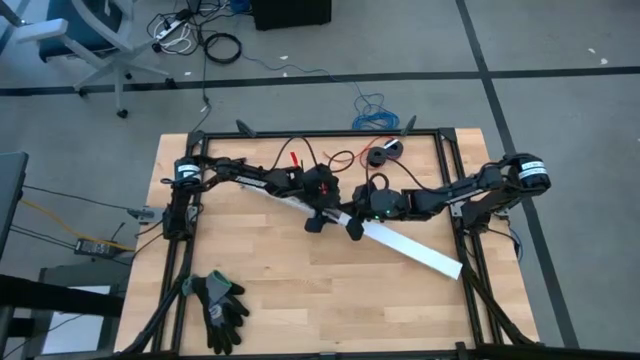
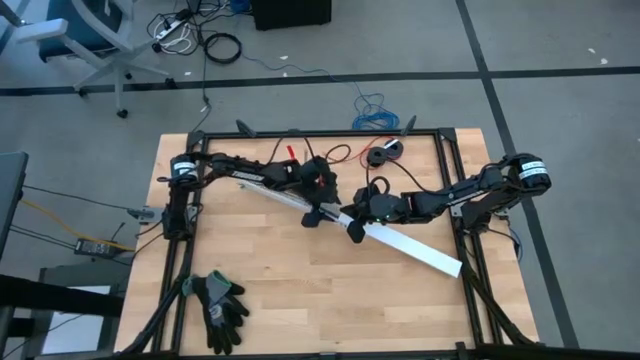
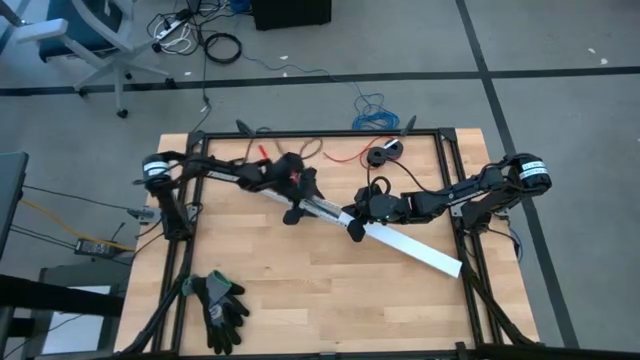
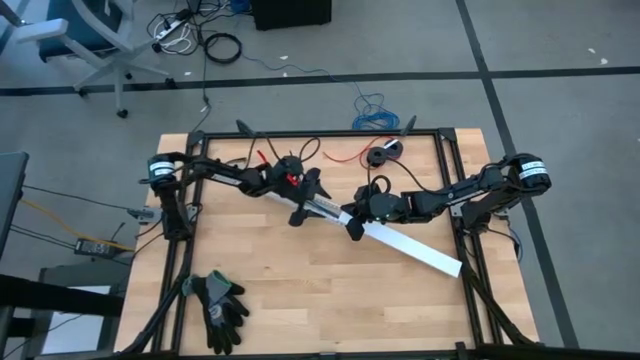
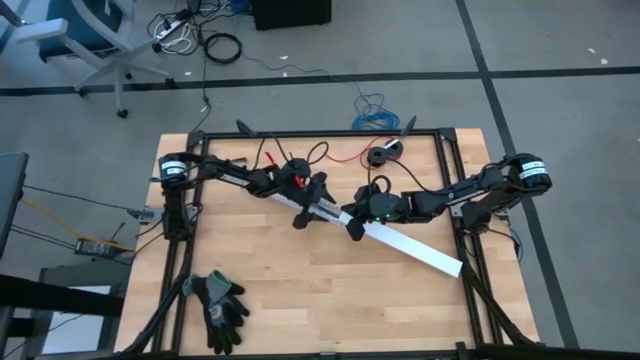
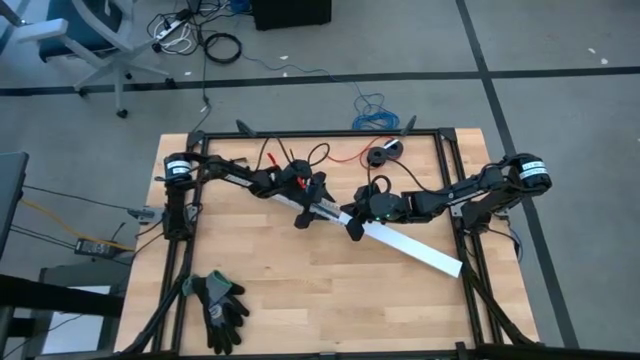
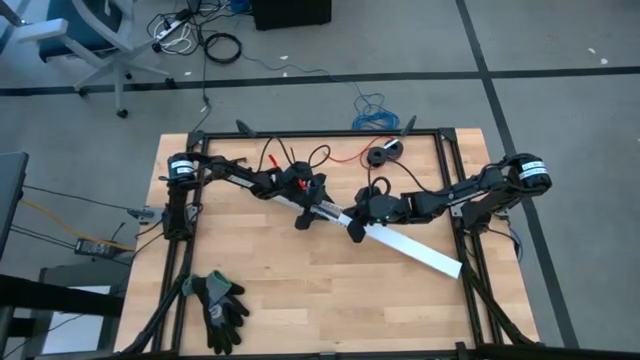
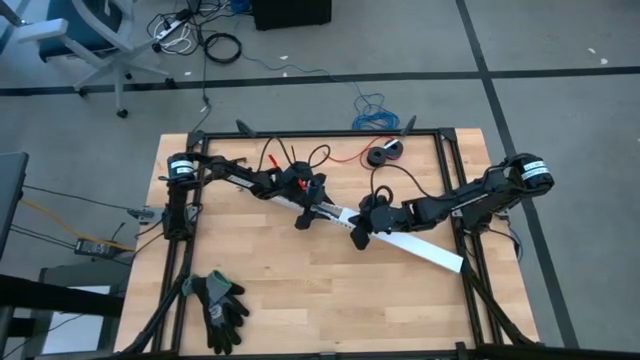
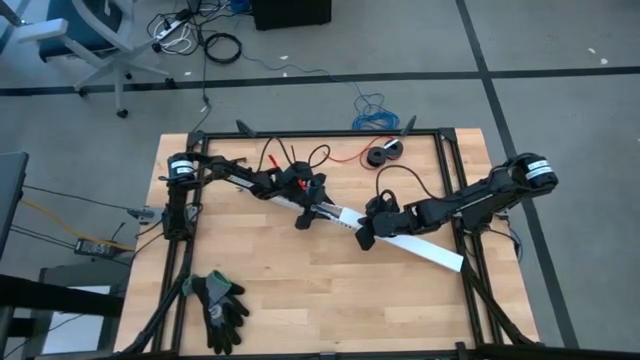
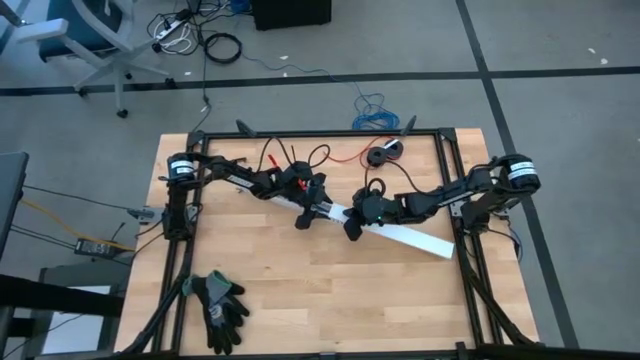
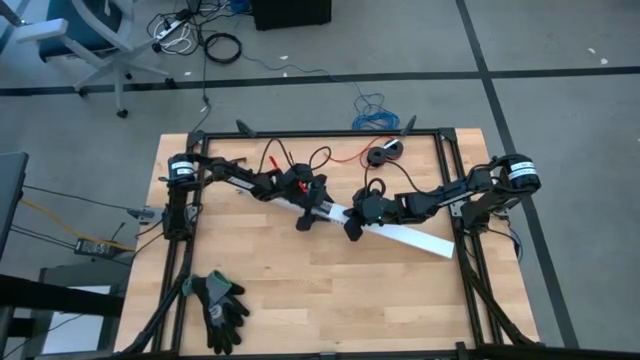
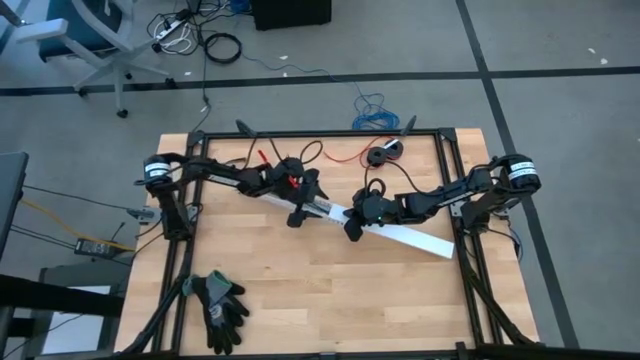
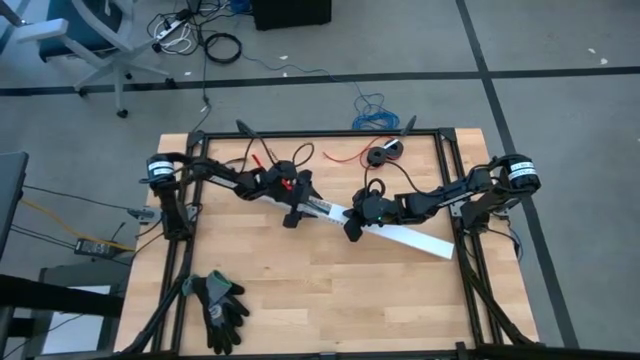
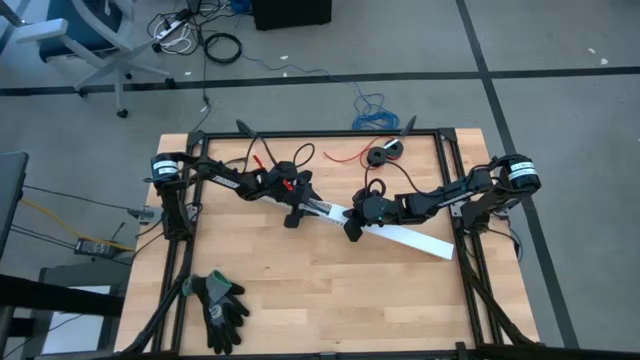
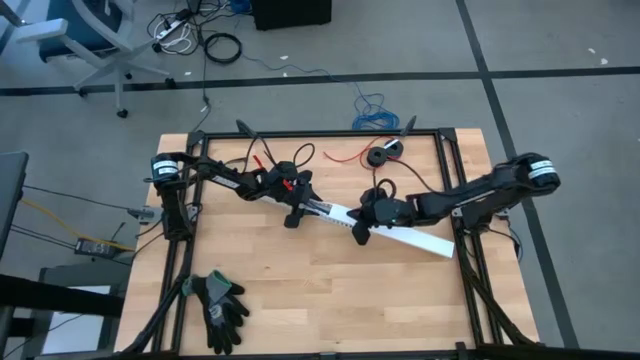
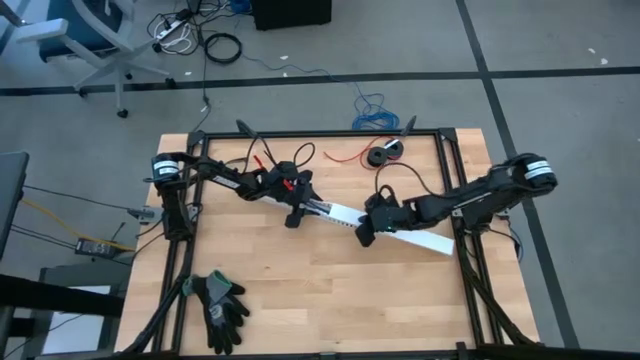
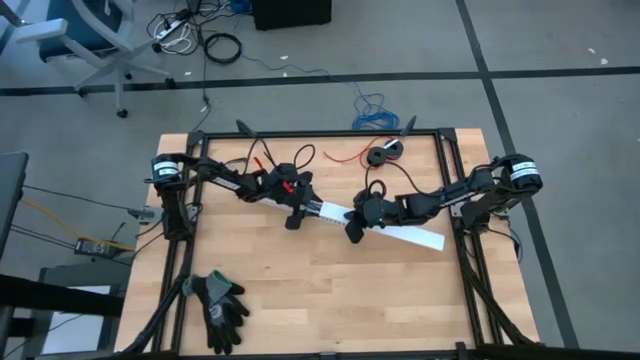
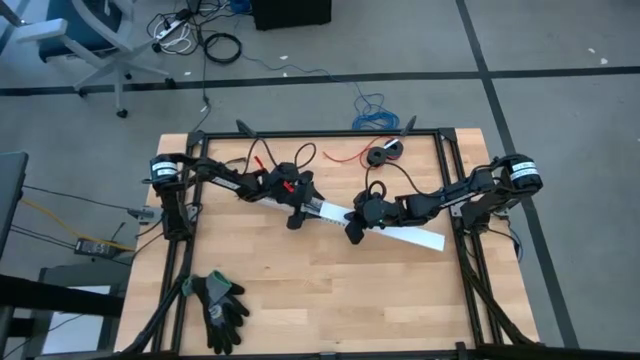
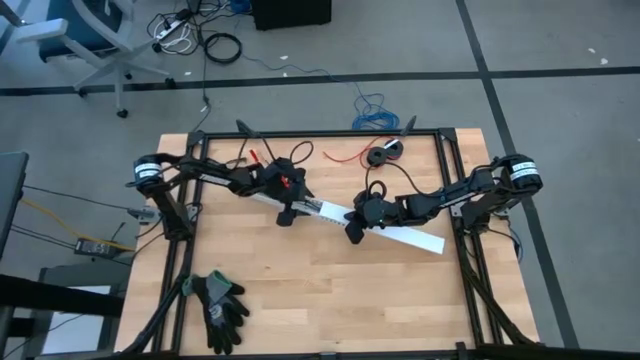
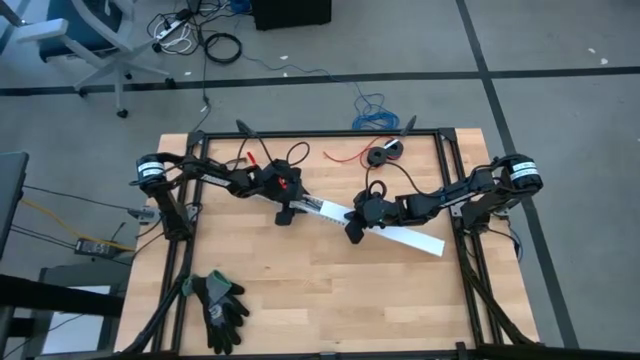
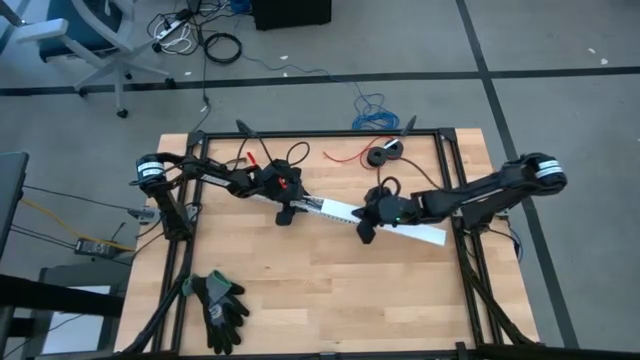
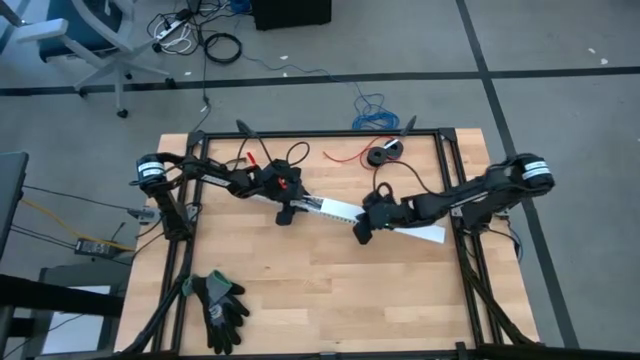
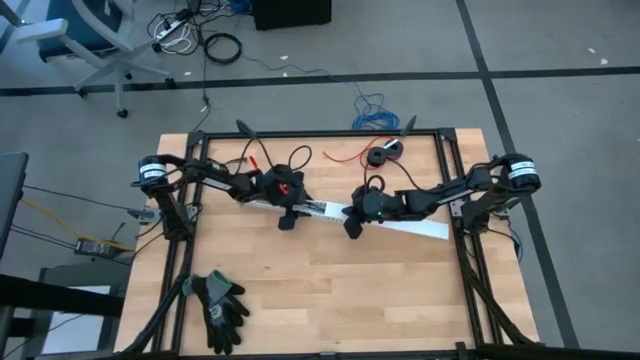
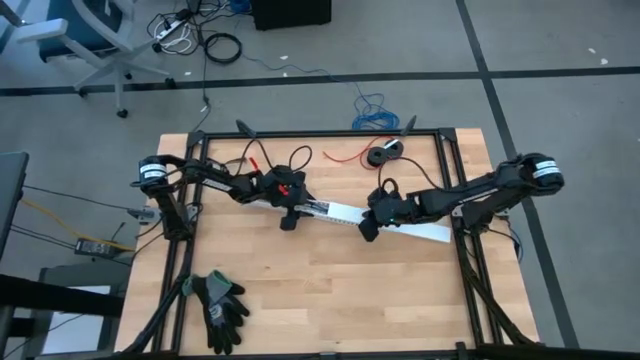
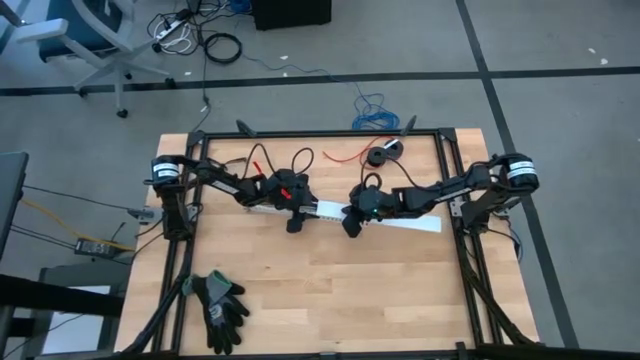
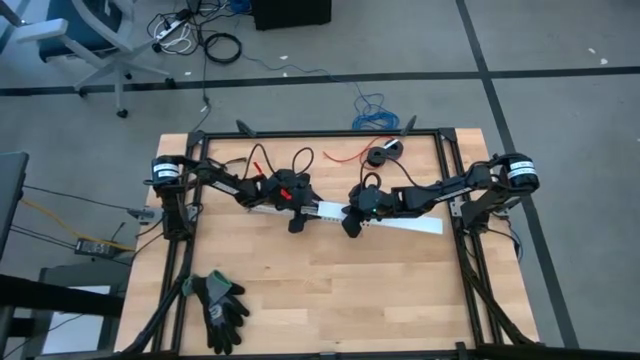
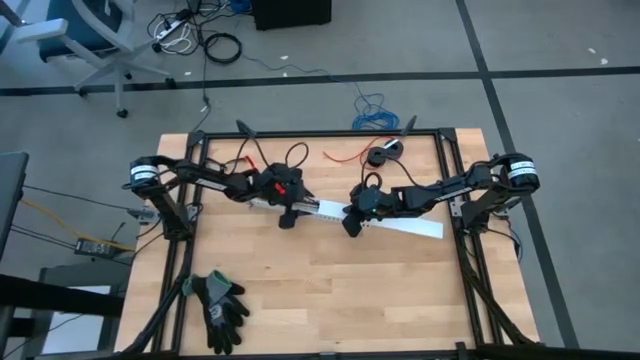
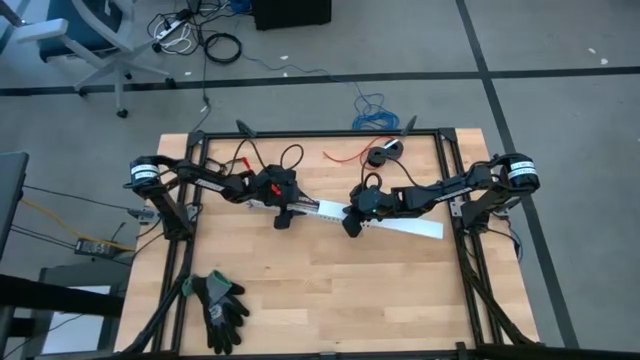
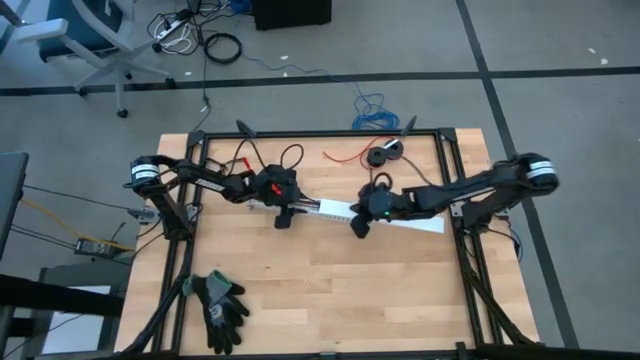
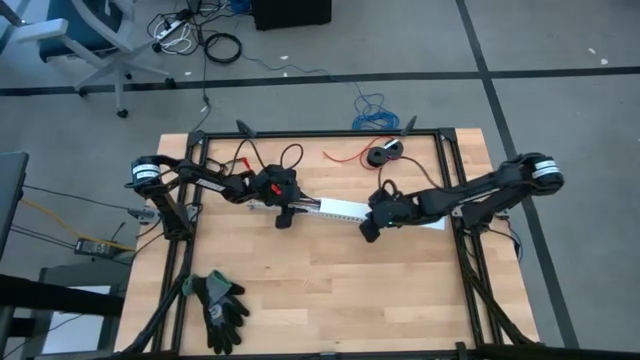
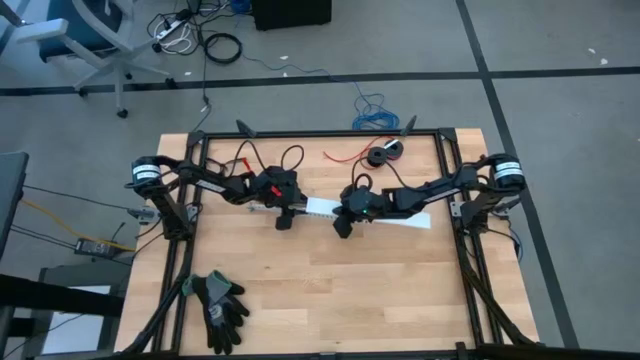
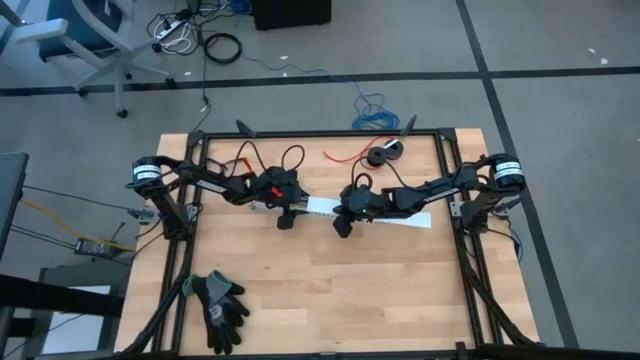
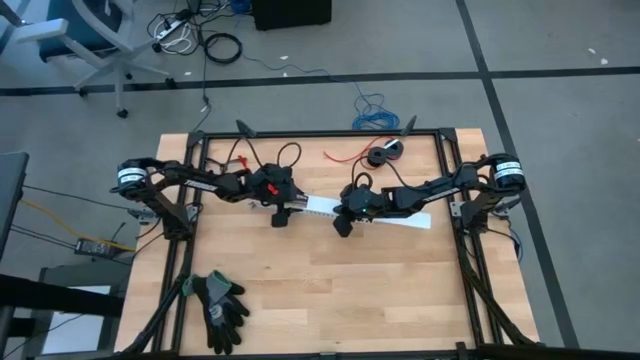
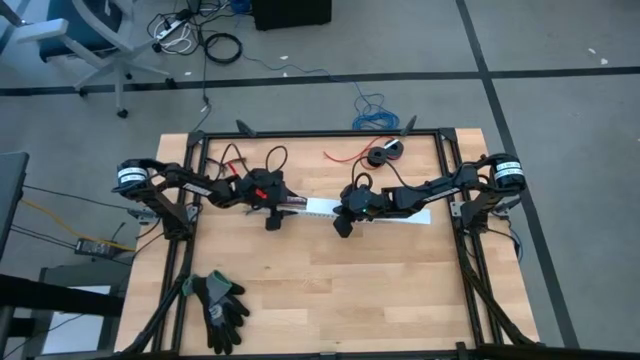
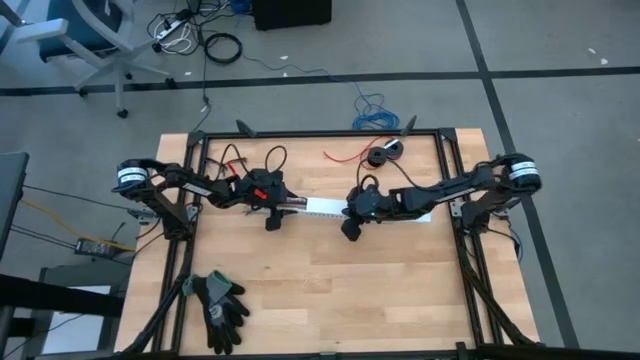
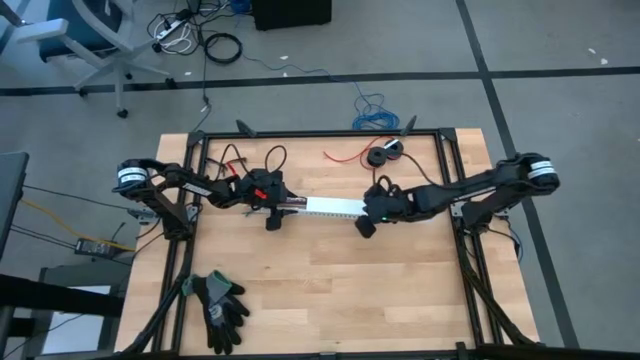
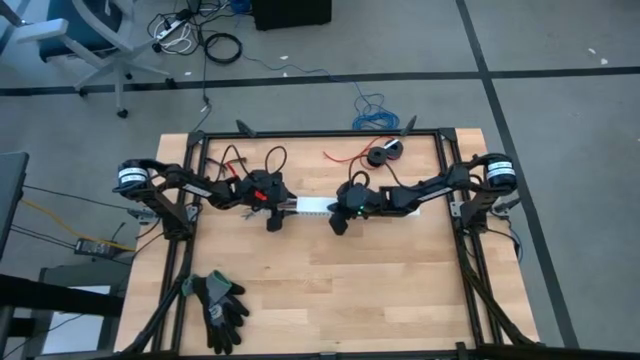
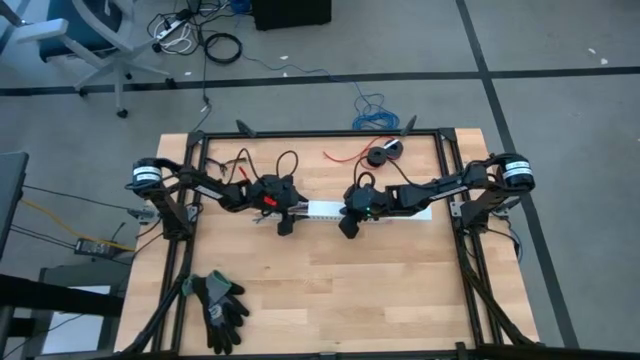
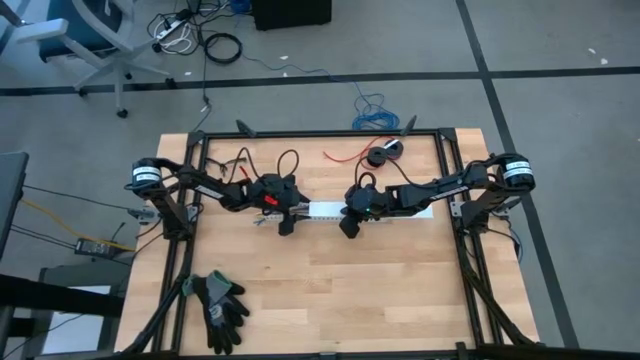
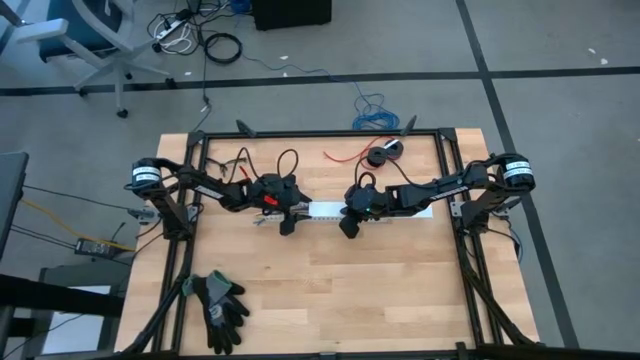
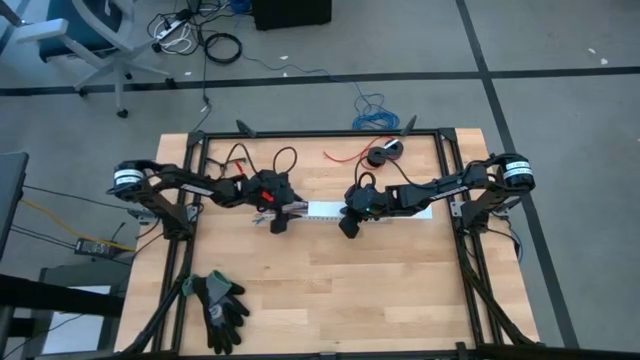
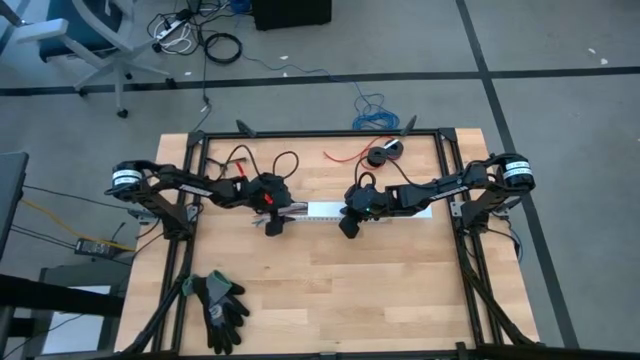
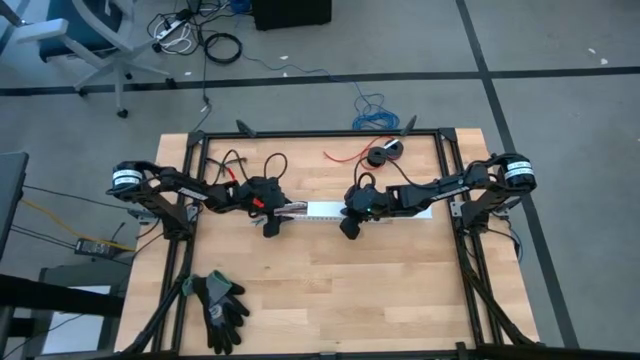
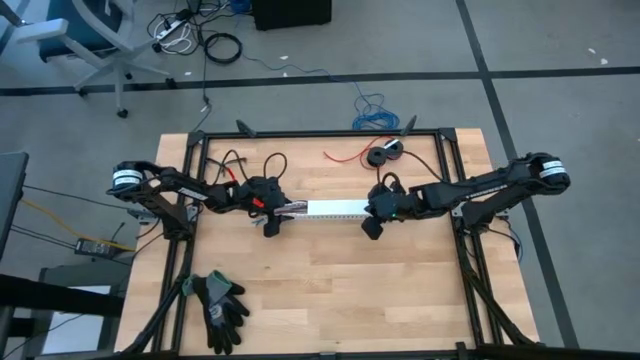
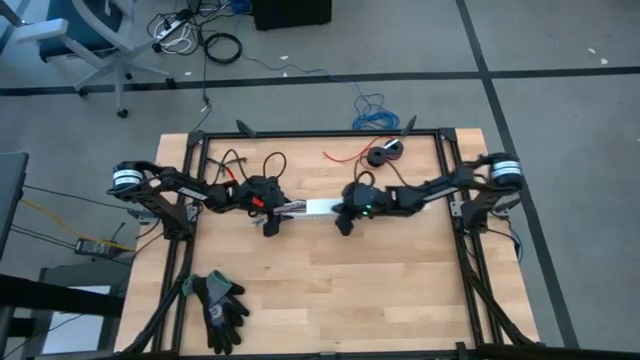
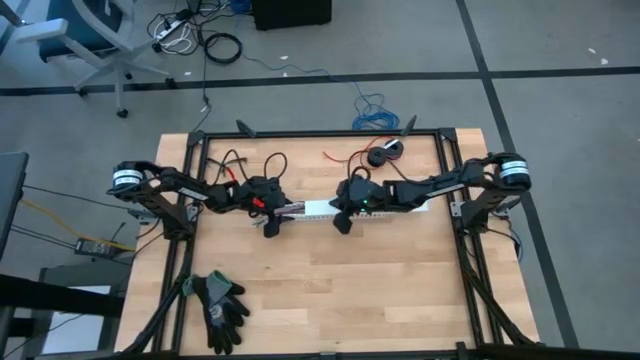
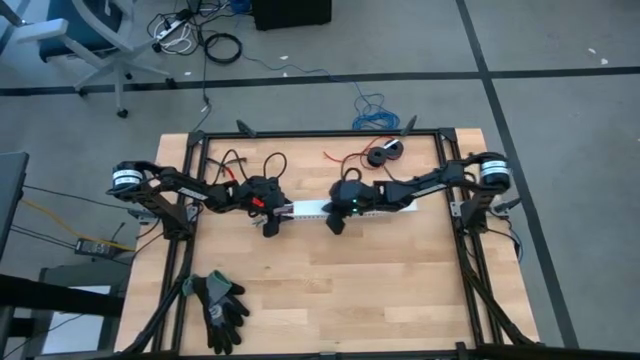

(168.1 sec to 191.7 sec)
Task: Ziptie cables
Close the white cable duct cover
